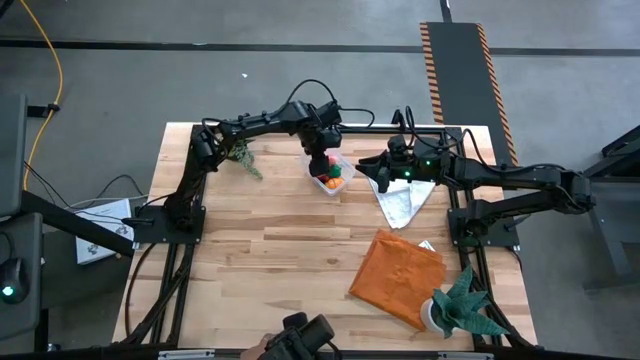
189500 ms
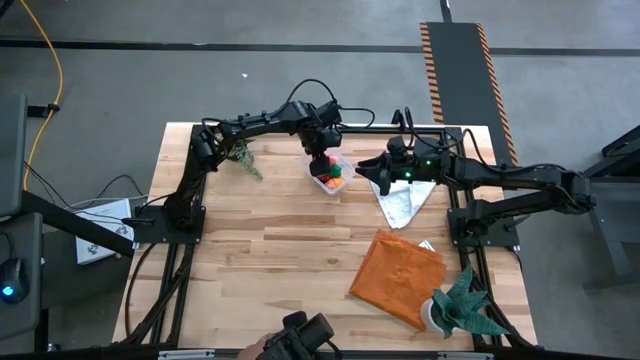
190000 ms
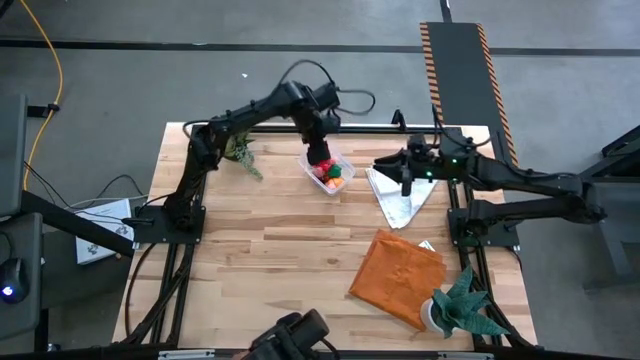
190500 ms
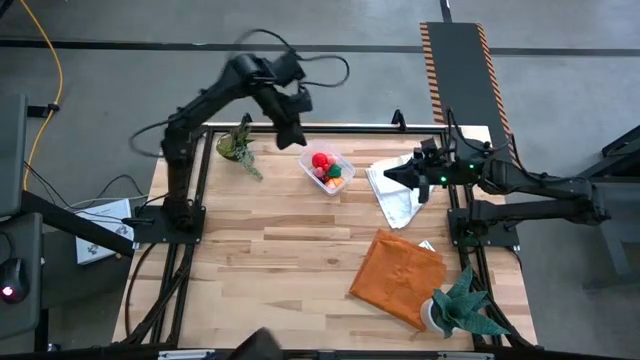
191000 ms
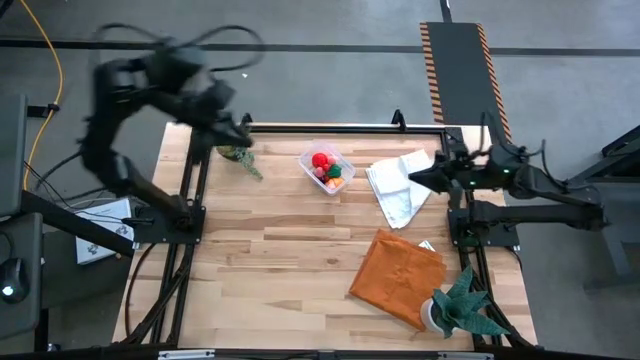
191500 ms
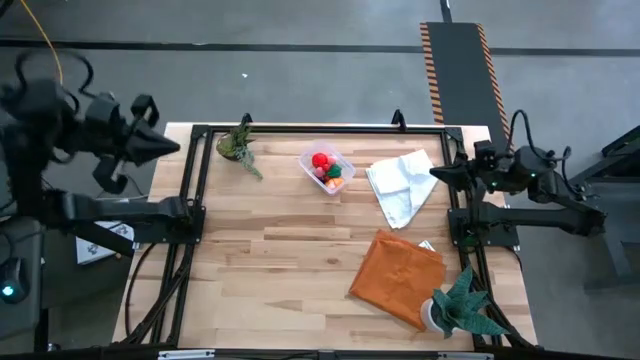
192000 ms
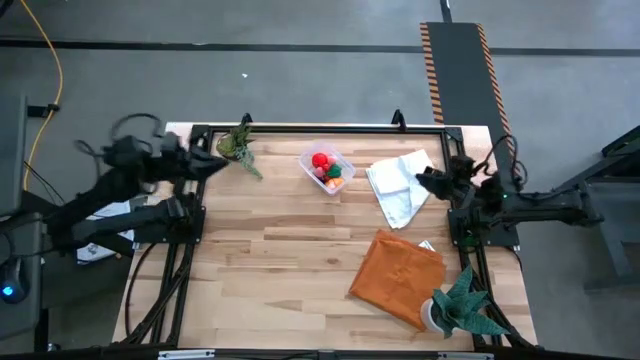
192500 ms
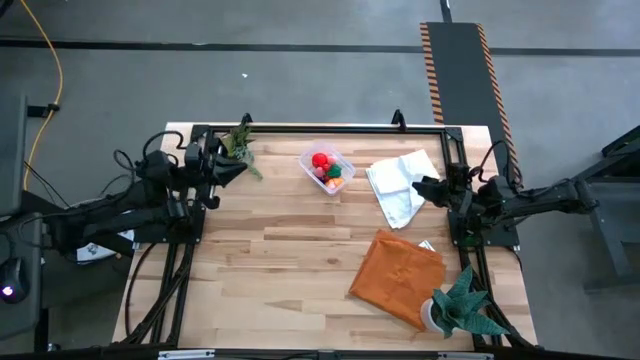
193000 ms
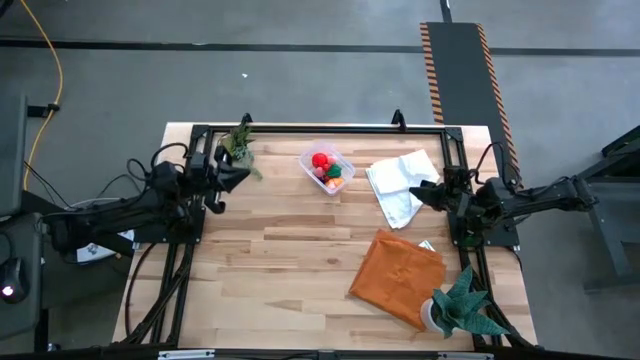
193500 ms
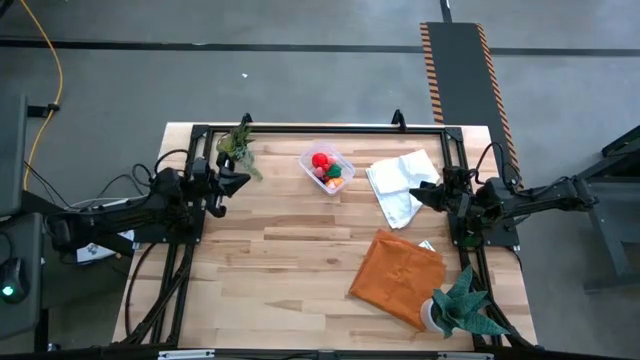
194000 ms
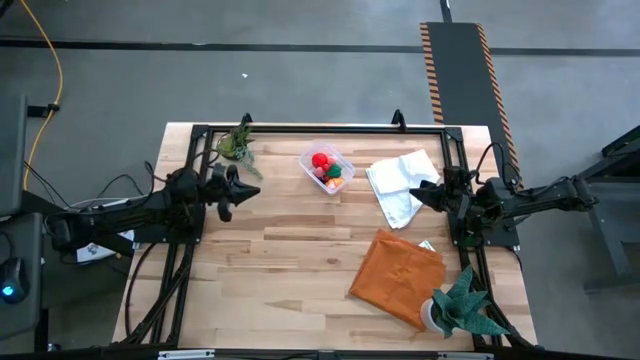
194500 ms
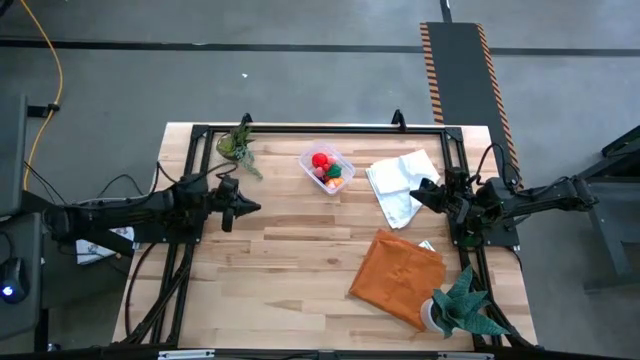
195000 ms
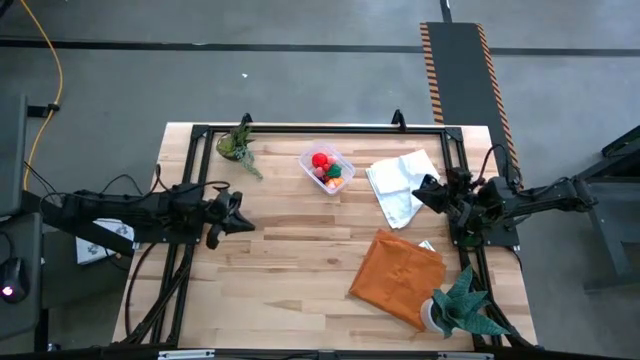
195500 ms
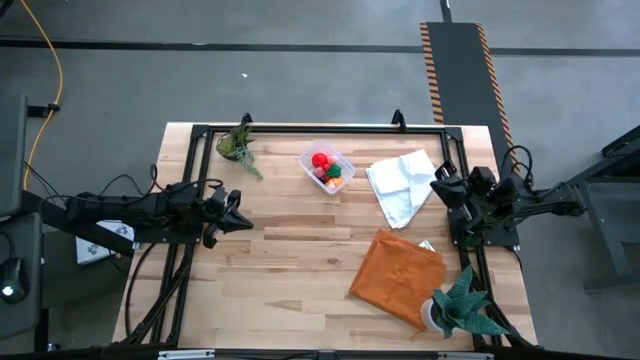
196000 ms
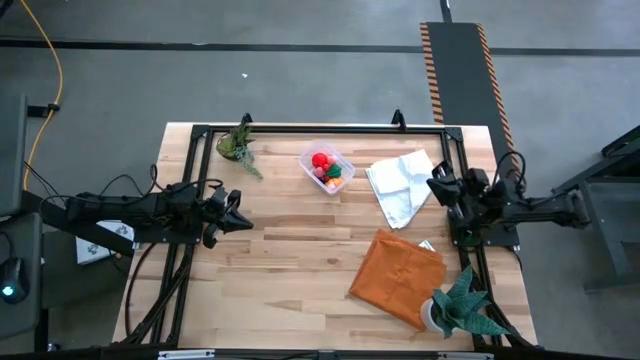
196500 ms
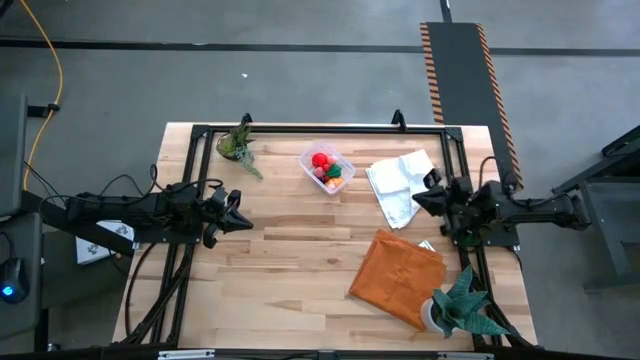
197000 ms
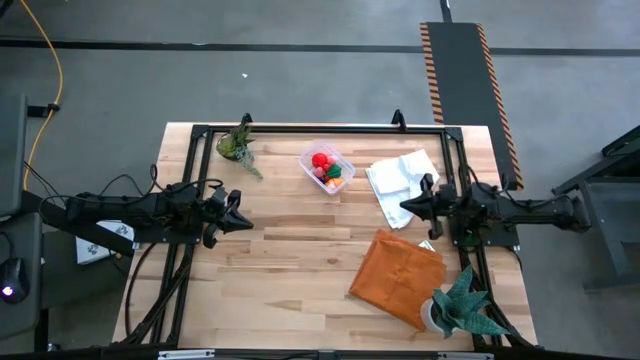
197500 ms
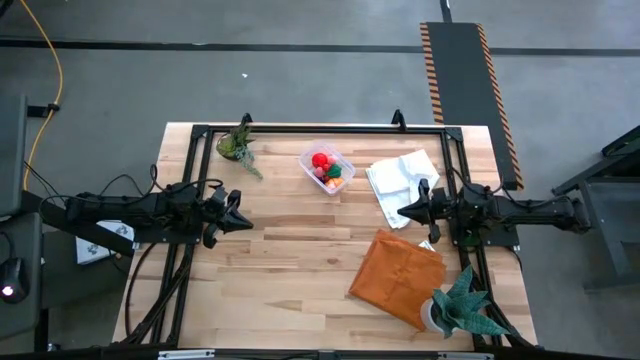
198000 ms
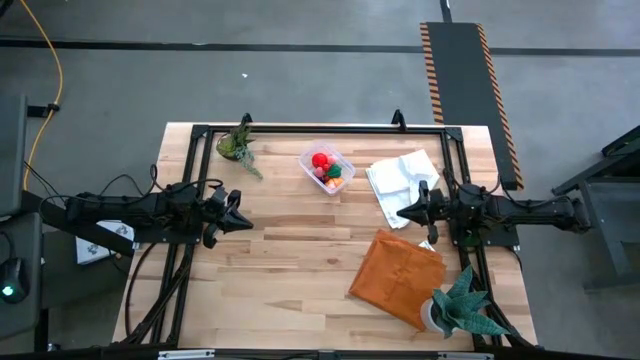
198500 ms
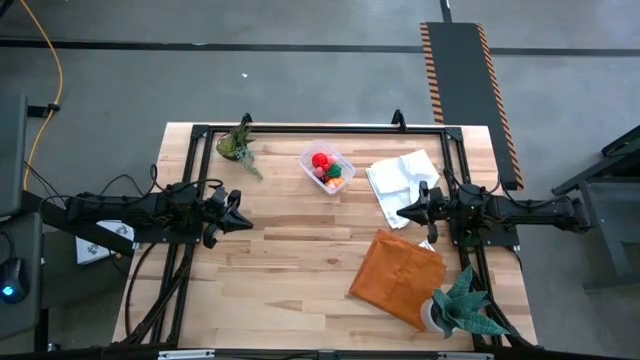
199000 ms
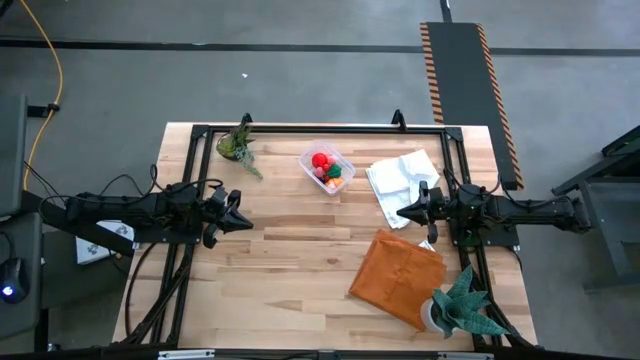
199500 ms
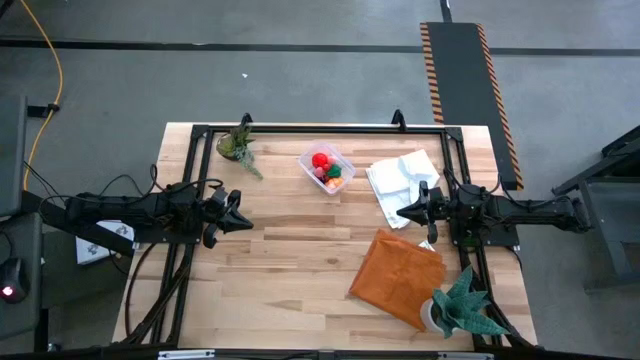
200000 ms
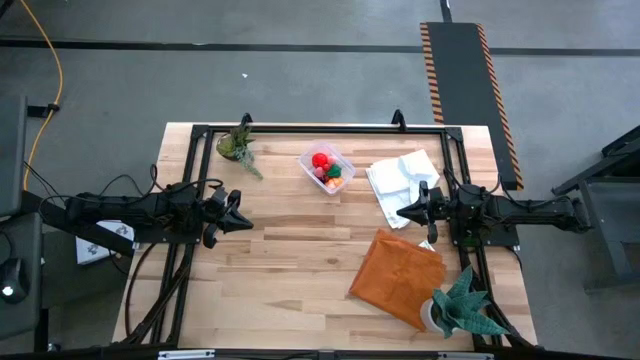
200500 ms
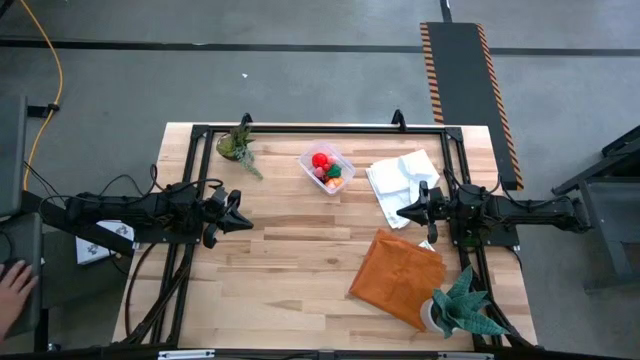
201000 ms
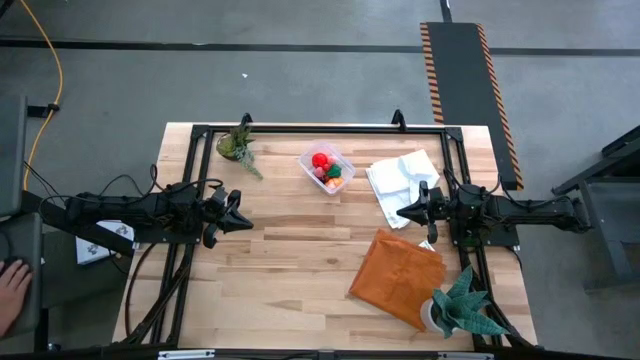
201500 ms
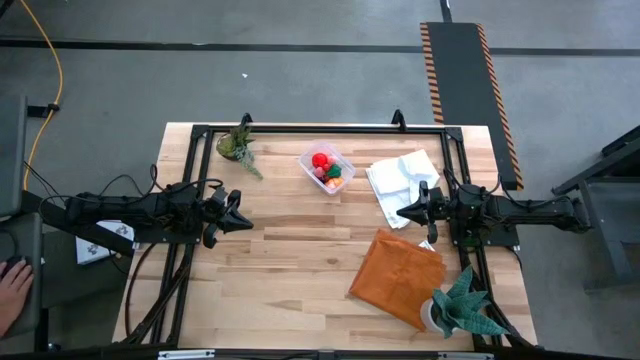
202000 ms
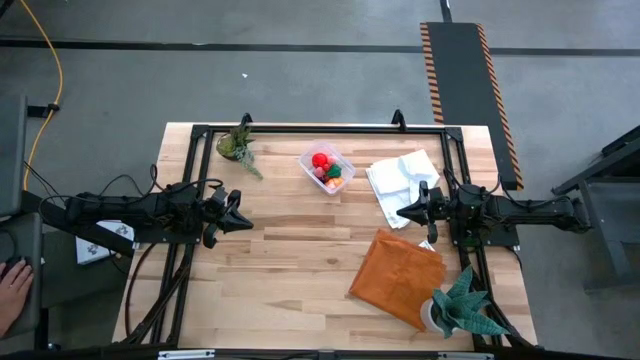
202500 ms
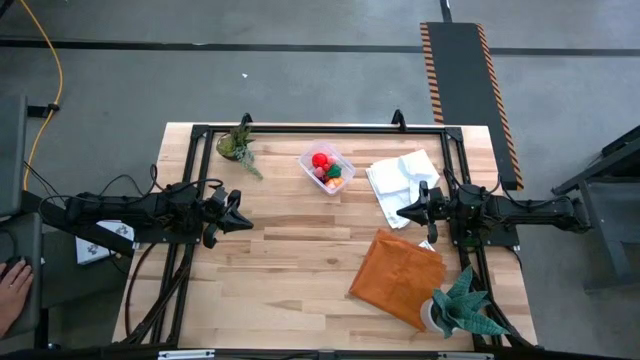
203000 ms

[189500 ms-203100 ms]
Task: Pick and placing Produce into tupperware
Return to Home Position

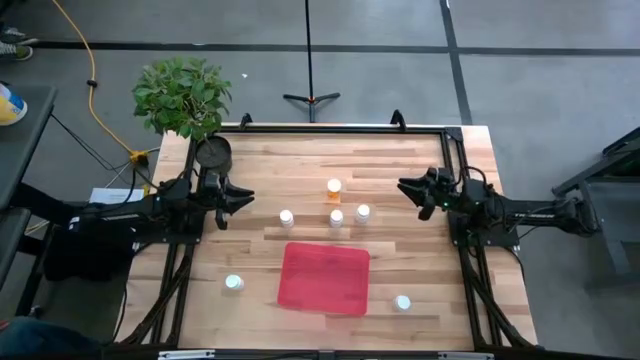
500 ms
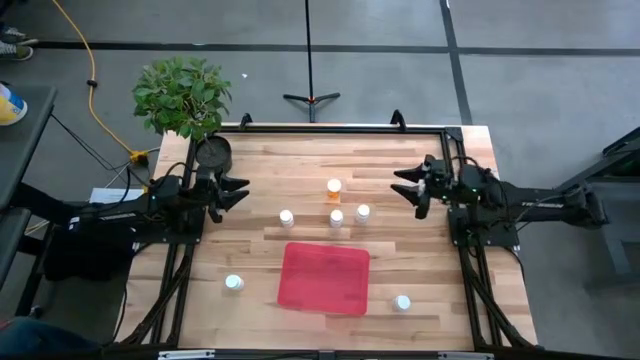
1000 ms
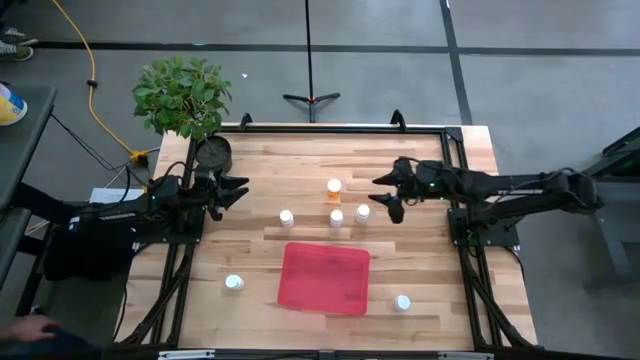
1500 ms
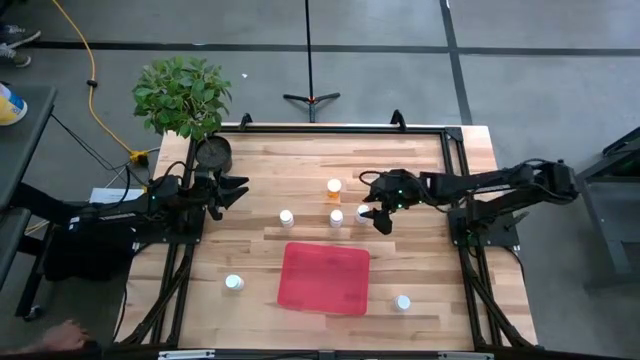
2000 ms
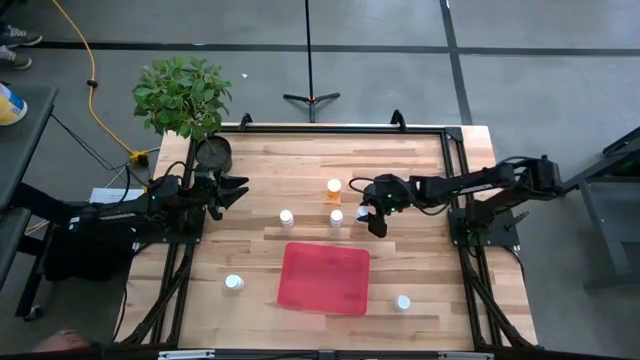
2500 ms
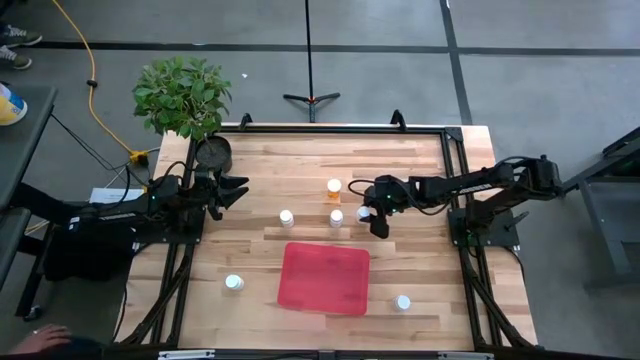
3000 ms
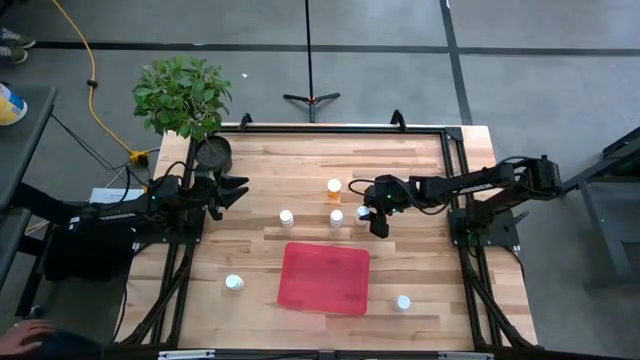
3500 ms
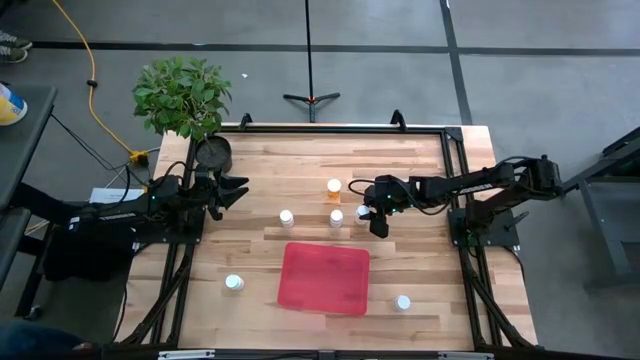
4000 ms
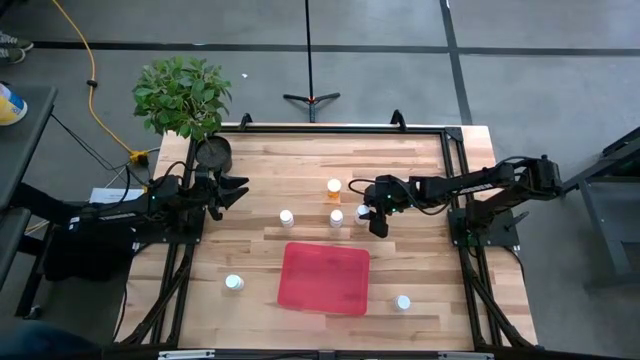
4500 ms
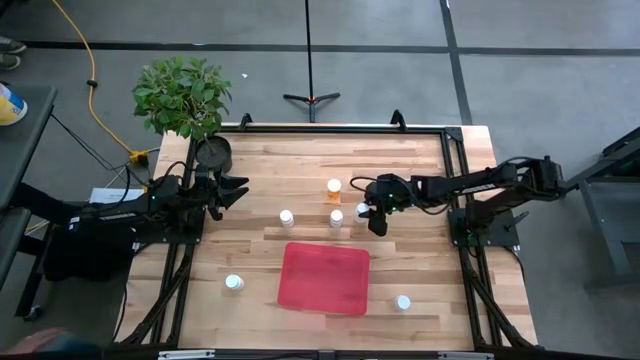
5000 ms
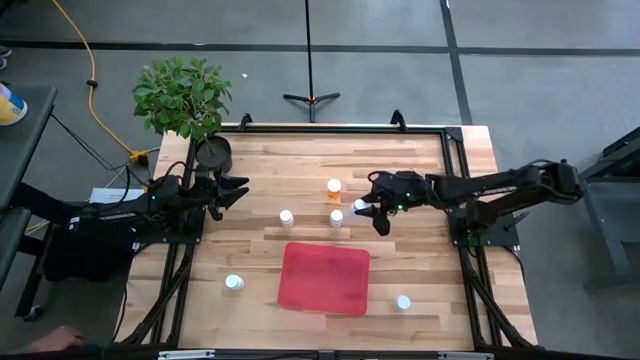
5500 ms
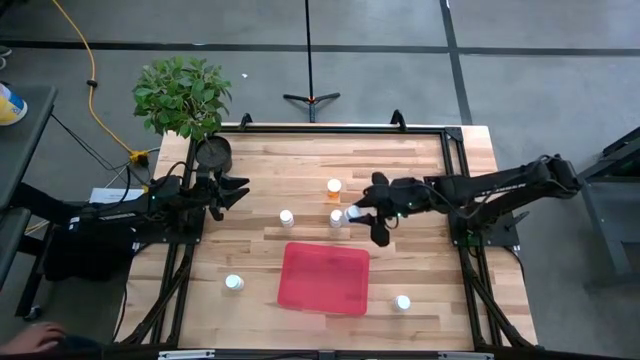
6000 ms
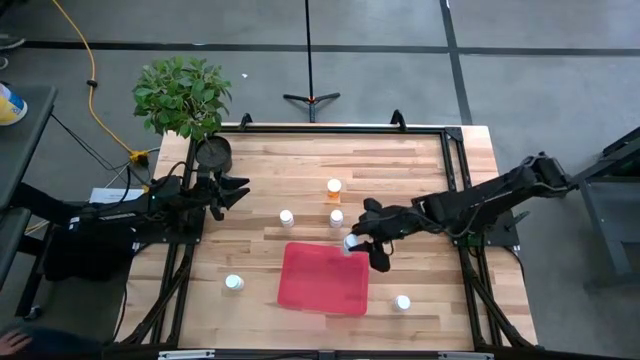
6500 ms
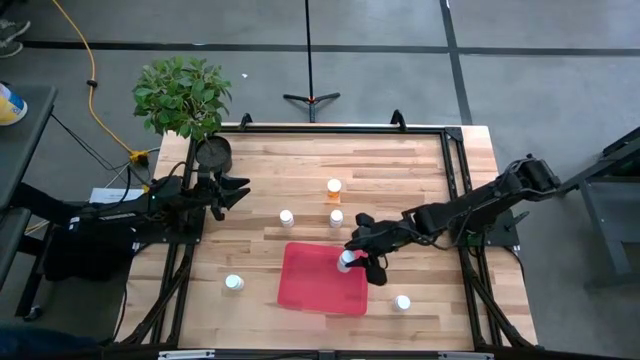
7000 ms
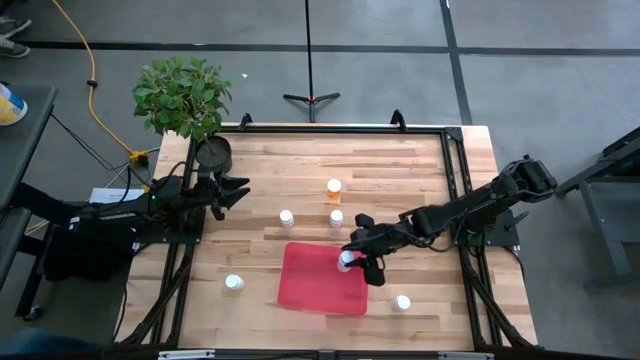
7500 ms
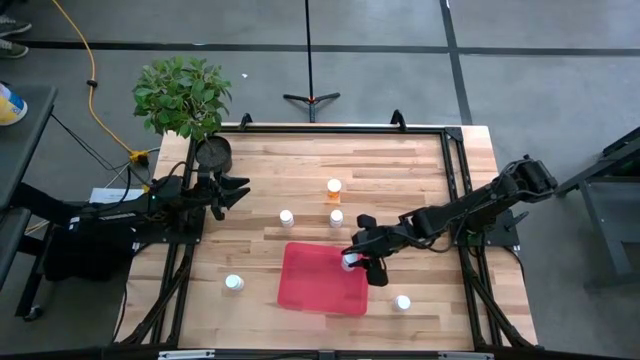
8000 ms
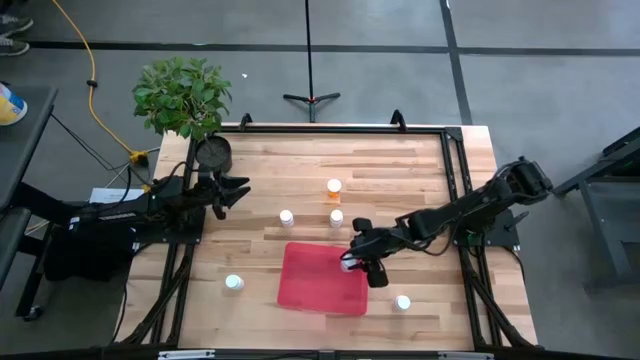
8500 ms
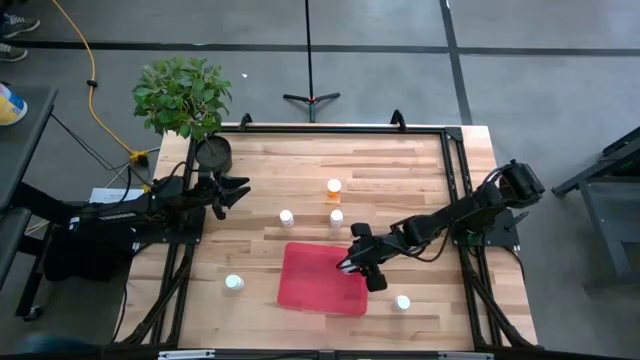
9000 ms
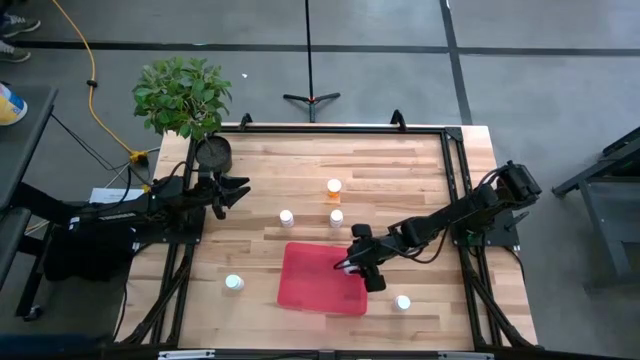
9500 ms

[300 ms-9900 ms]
Task: Pick and place pill bottles into a basket
Put the white pill bottle into the bin
